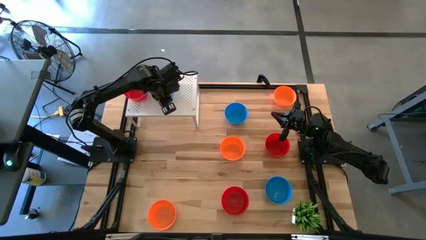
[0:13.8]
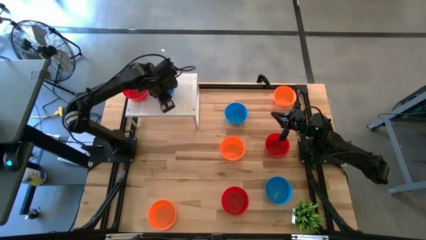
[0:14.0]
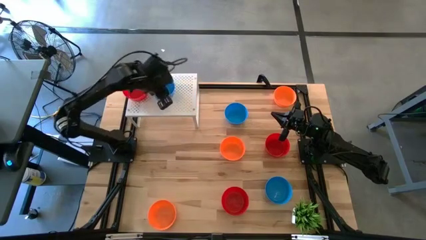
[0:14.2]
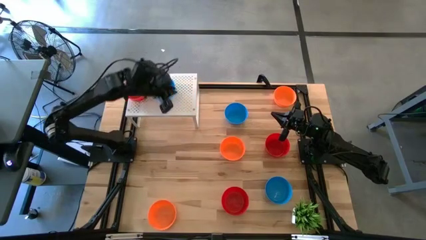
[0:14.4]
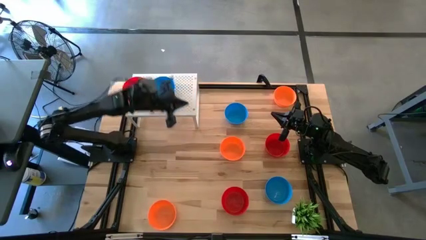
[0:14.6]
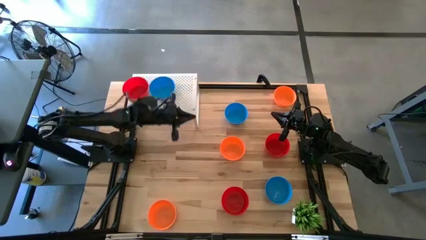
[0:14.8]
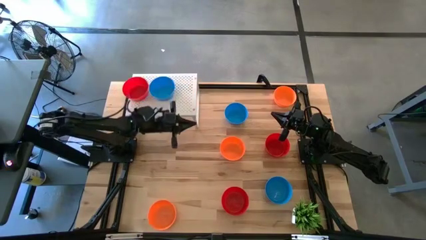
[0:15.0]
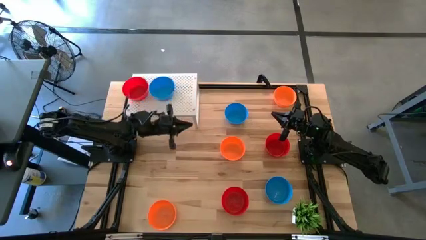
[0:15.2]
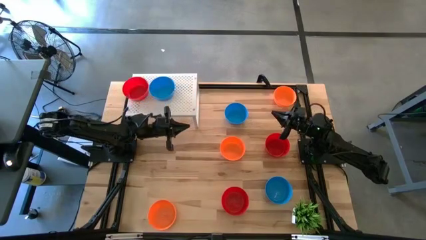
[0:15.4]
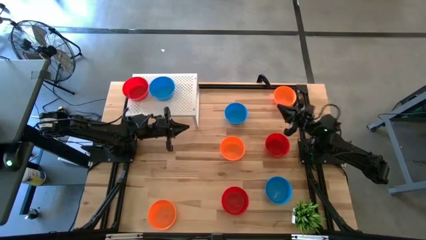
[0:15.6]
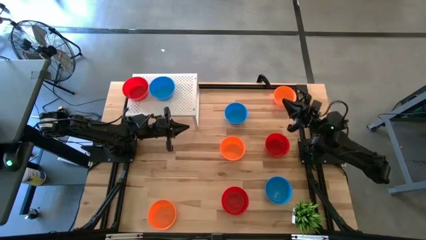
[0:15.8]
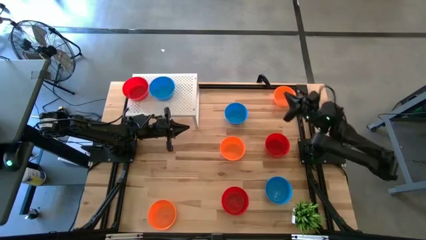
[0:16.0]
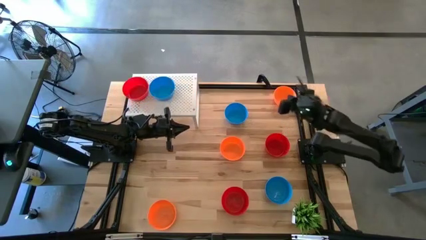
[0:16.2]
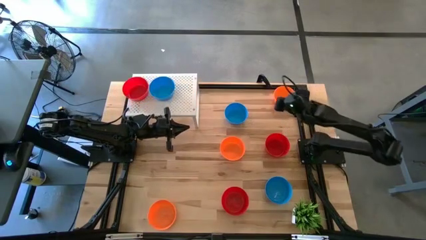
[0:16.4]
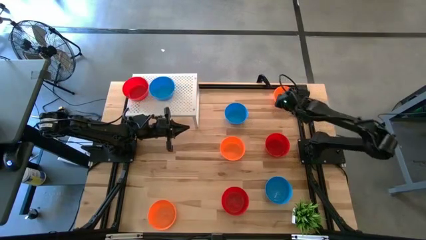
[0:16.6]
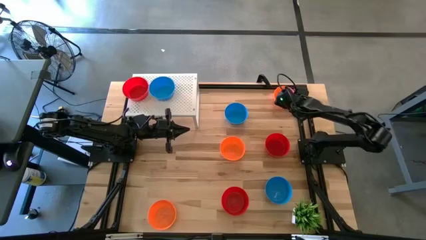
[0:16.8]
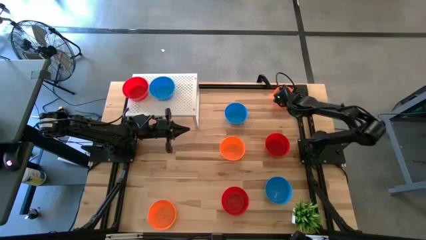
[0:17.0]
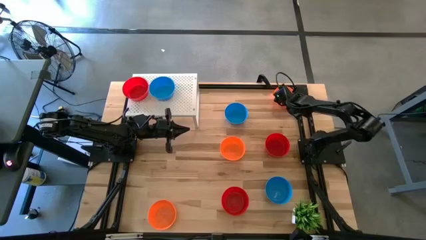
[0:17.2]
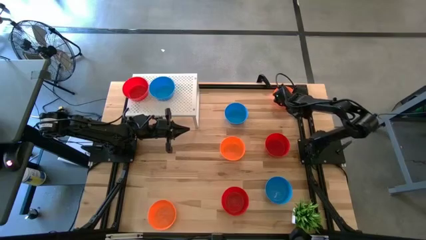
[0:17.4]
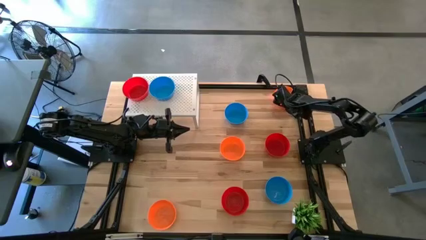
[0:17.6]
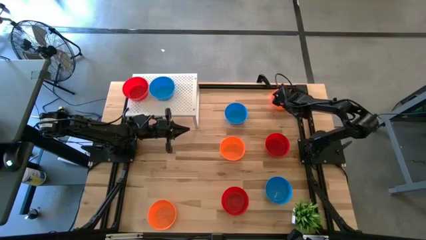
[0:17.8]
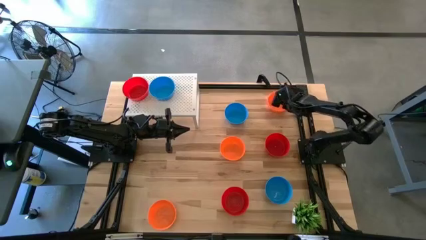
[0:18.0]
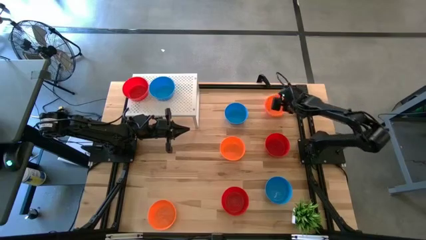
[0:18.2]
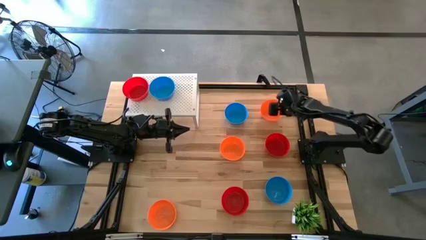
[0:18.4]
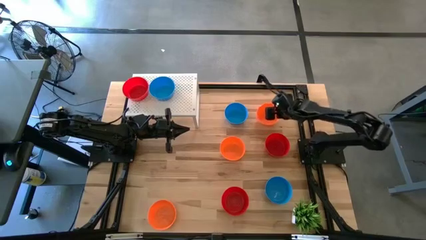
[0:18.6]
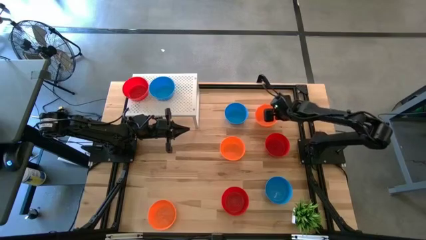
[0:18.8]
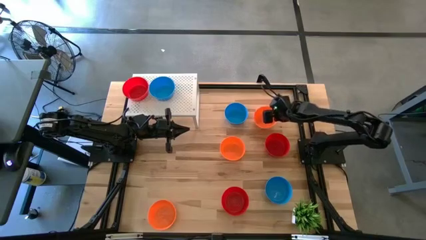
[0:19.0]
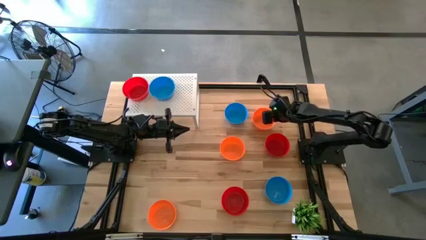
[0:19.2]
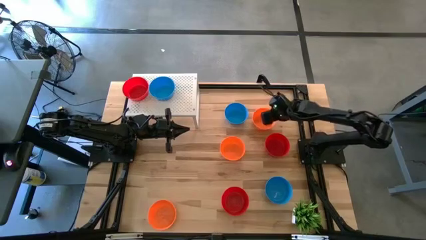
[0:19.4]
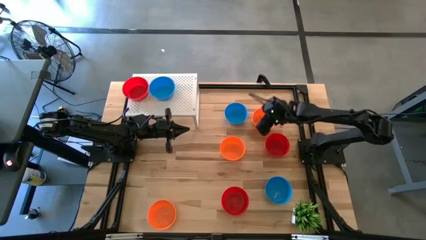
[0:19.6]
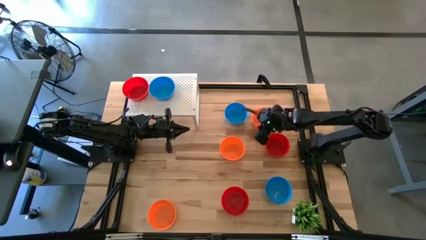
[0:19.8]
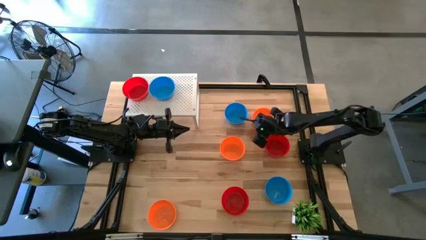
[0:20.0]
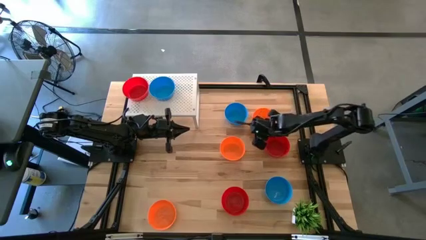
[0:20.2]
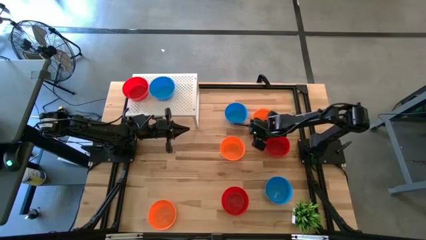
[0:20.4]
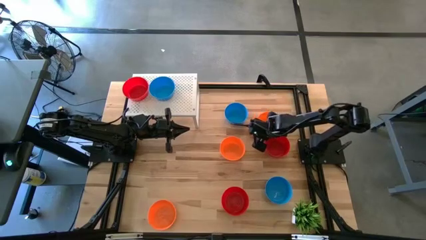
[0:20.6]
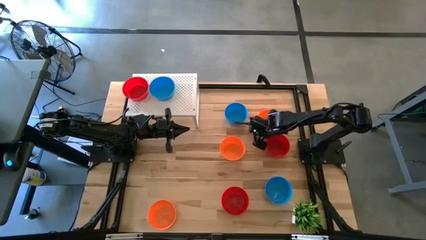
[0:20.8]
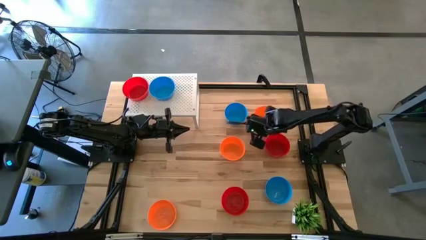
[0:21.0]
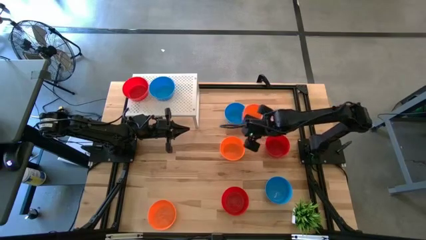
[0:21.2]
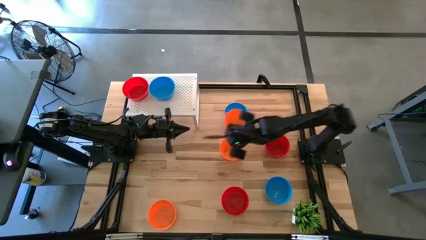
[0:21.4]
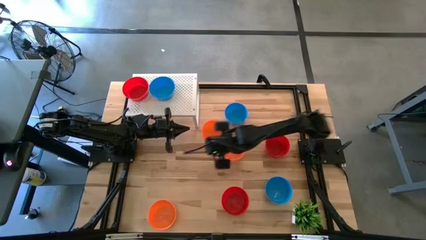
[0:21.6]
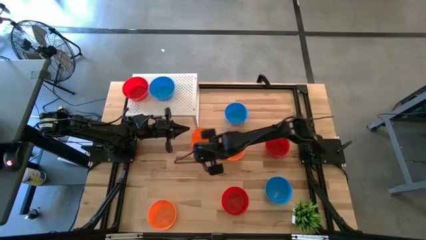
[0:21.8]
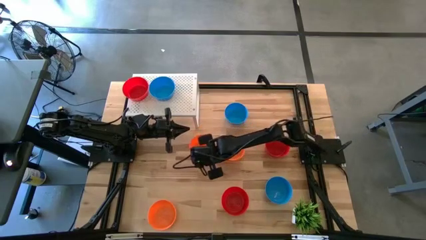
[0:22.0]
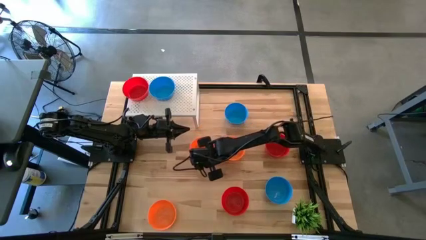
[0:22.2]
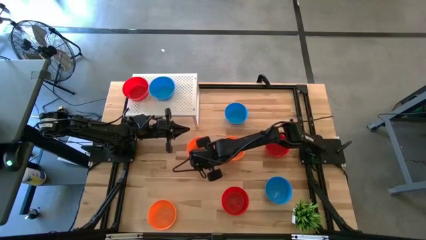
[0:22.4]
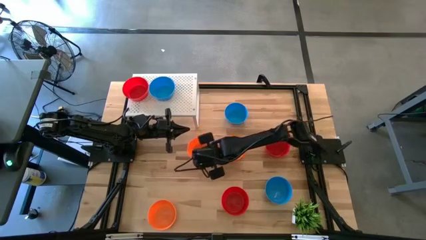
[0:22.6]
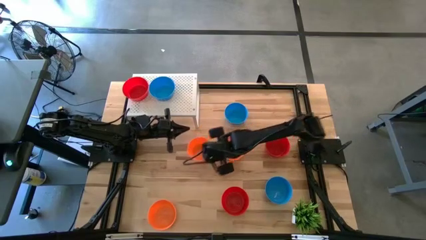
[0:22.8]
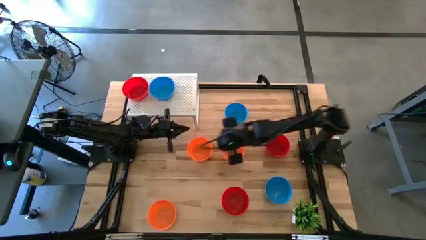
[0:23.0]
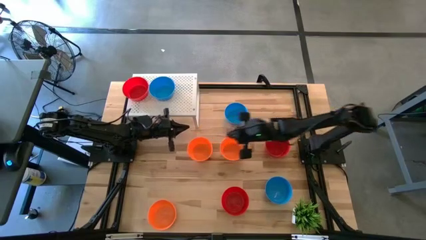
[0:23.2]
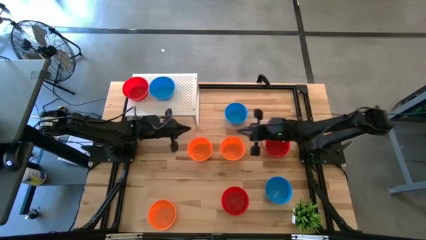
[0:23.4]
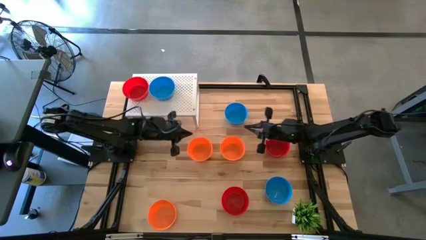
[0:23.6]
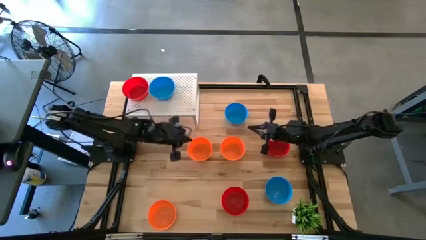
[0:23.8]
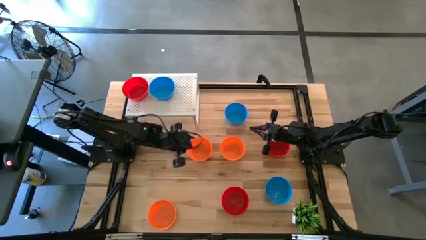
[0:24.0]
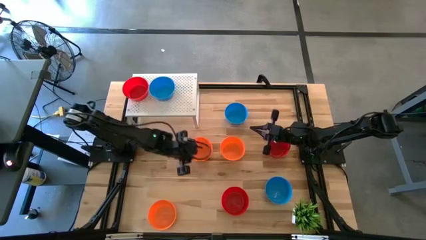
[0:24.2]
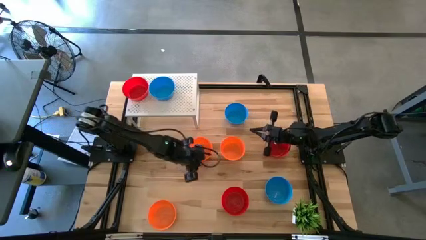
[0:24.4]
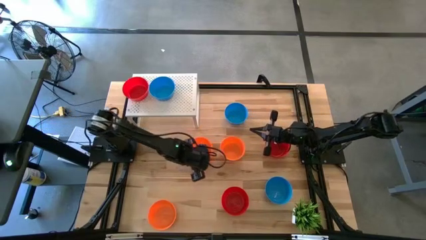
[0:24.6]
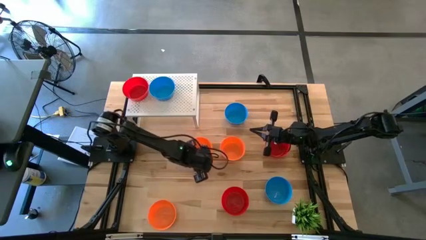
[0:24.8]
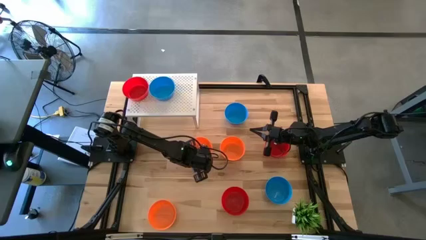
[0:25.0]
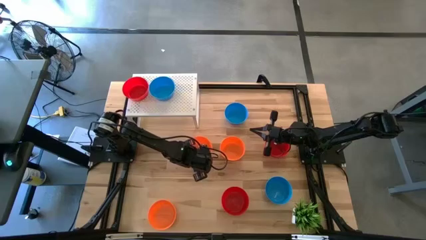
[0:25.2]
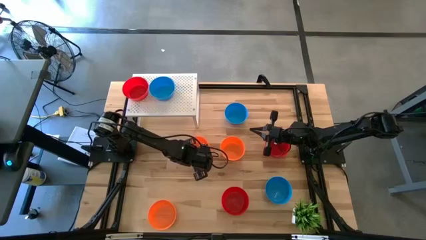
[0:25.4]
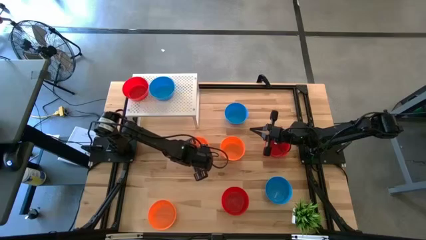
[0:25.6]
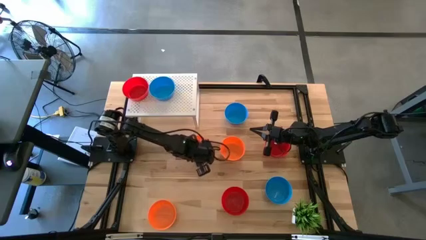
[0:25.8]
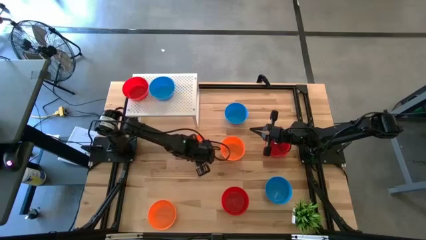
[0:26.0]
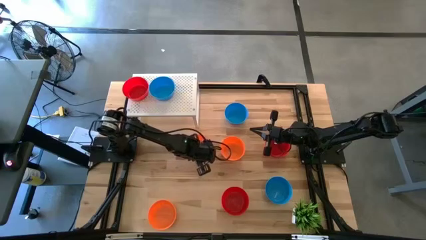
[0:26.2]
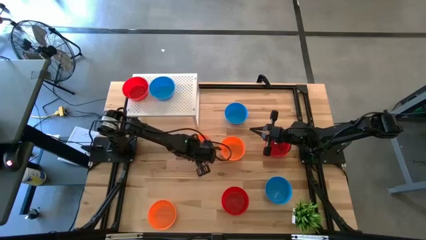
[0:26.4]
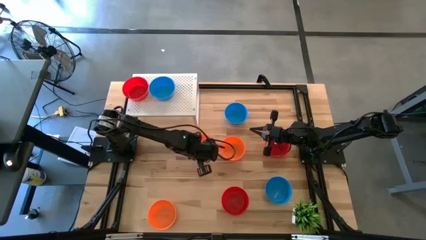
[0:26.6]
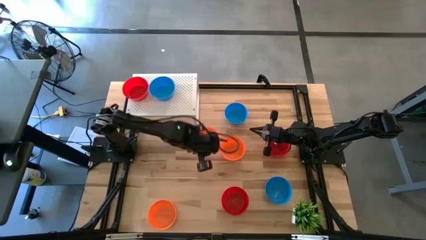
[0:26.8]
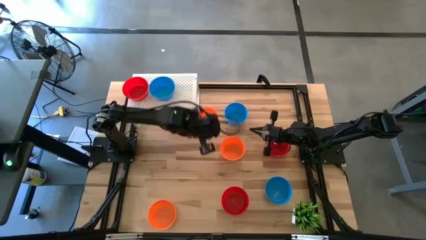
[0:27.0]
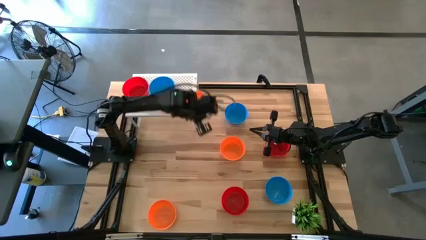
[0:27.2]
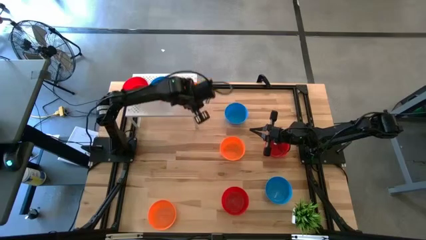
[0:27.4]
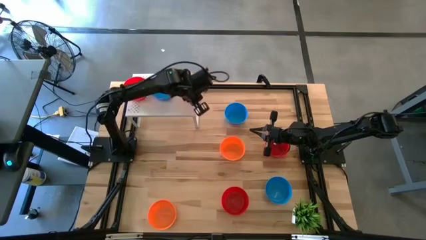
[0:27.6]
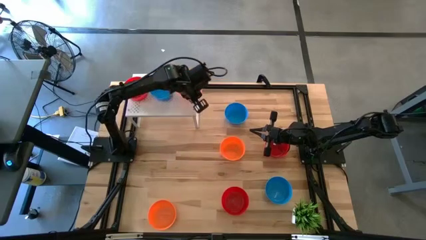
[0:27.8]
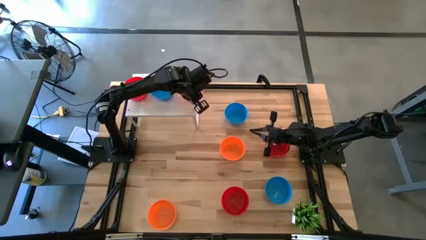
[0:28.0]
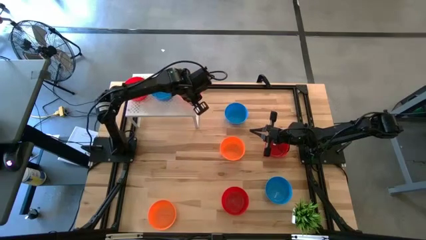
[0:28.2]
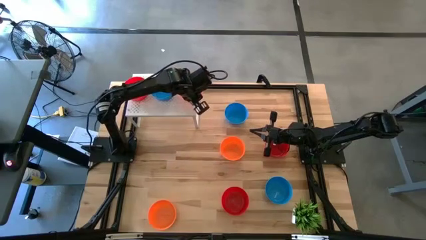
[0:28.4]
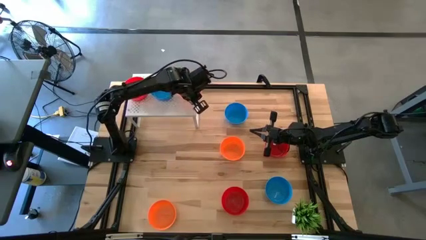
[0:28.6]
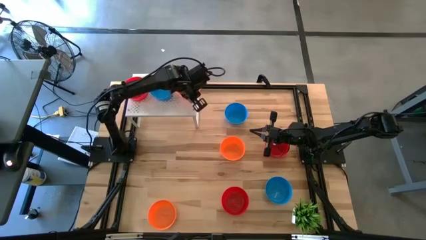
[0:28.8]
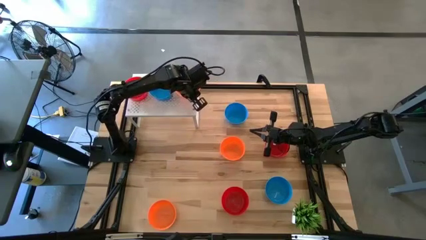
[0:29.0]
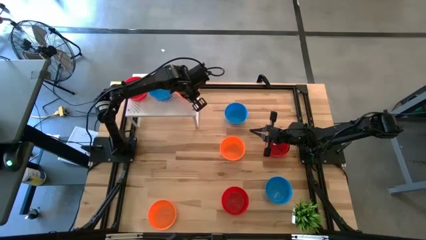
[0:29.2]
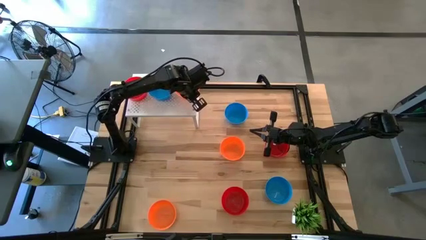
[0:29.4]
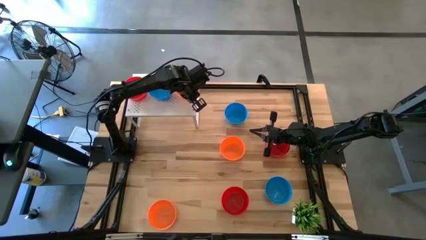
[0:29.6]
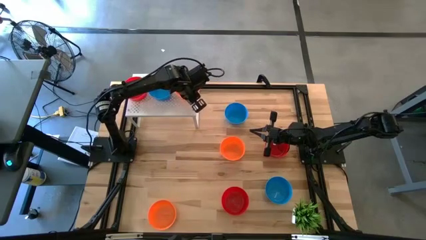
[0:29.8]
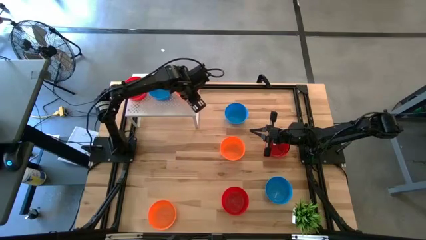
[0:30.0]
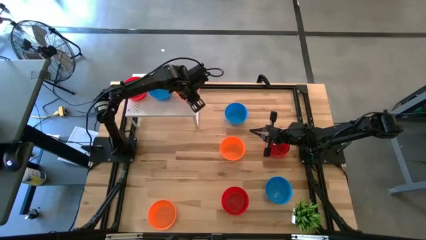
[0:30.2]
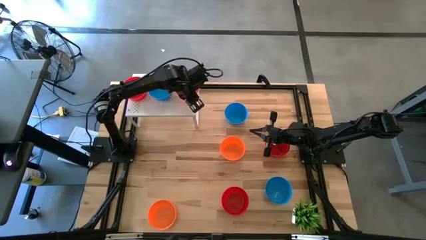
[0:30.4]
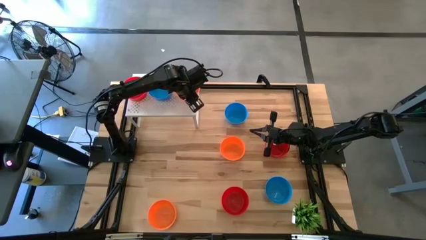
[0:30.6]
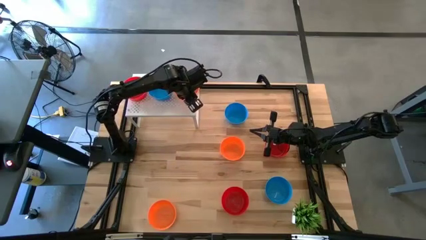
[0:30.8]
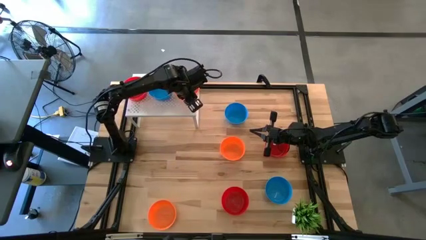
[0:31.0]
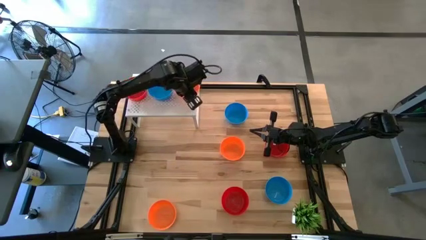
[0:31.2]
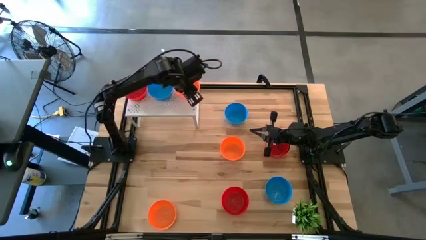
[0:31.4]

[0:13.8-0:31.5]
Task: Pick & Place Mini bowls
Put the top orange bowl on the shelf
